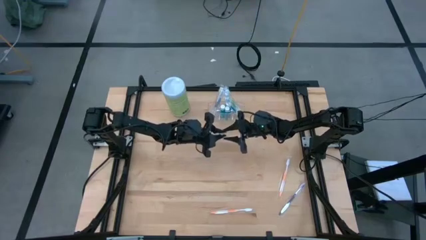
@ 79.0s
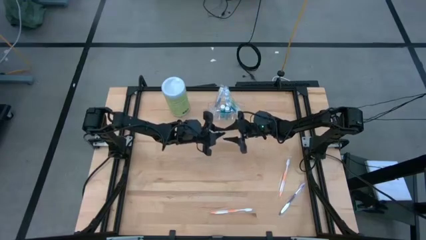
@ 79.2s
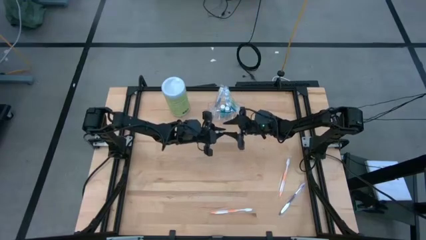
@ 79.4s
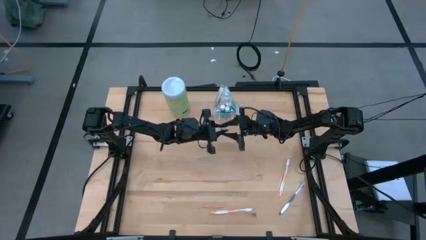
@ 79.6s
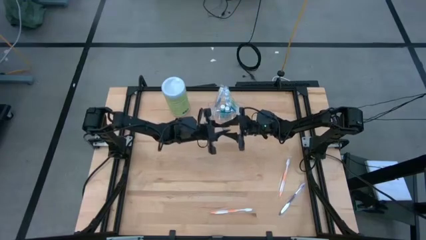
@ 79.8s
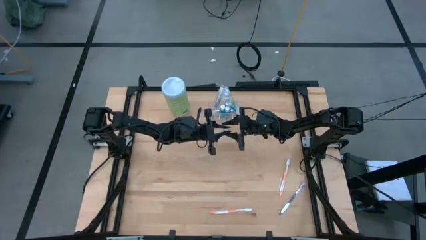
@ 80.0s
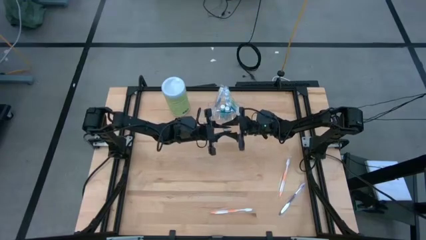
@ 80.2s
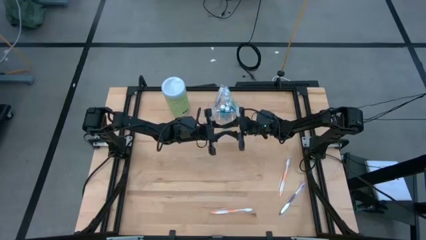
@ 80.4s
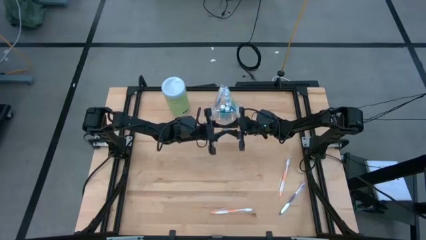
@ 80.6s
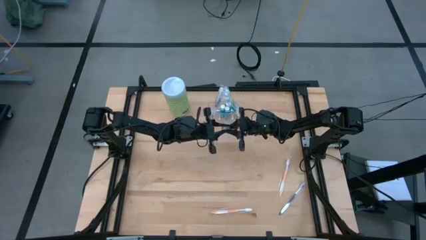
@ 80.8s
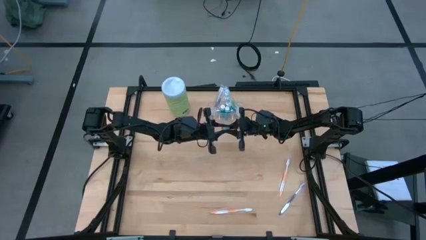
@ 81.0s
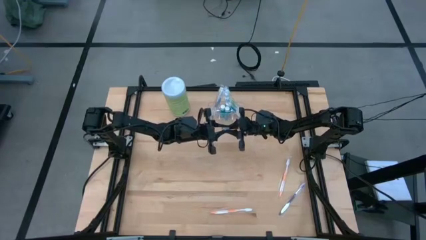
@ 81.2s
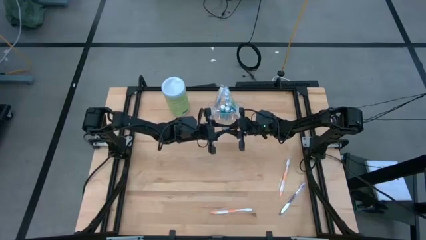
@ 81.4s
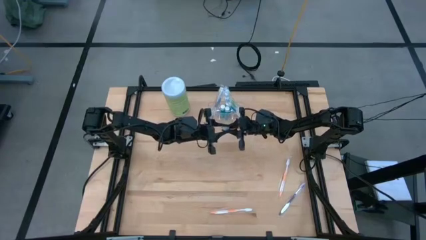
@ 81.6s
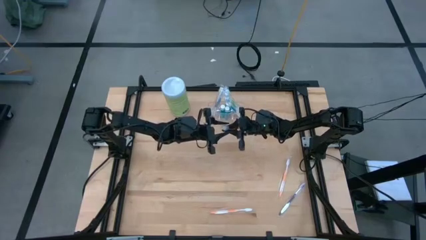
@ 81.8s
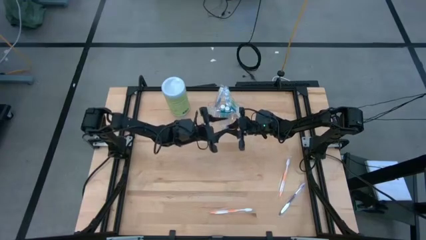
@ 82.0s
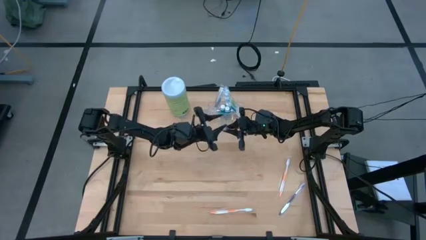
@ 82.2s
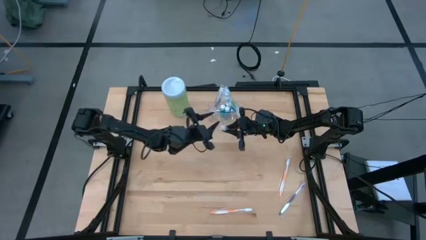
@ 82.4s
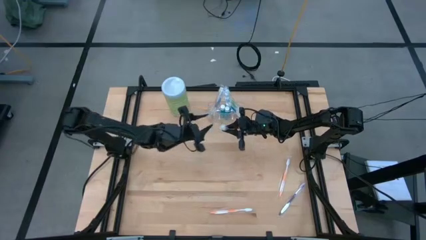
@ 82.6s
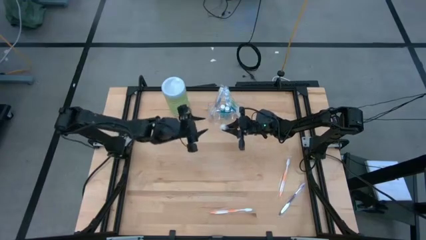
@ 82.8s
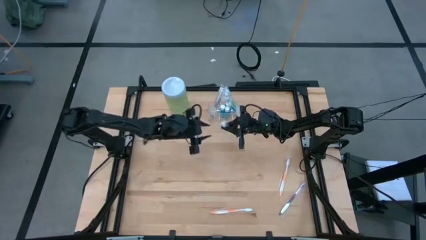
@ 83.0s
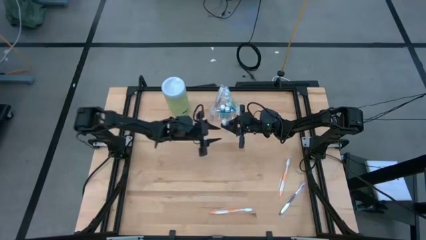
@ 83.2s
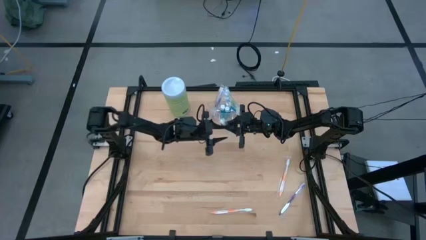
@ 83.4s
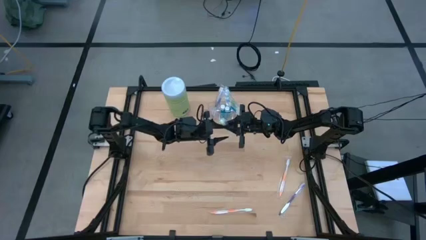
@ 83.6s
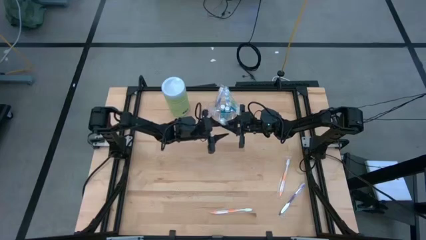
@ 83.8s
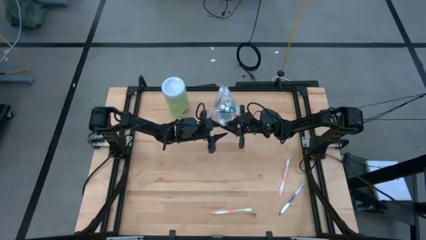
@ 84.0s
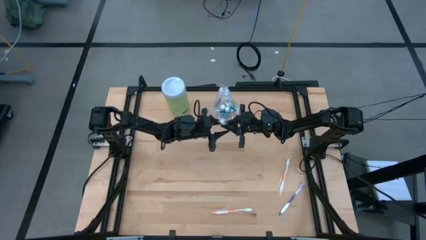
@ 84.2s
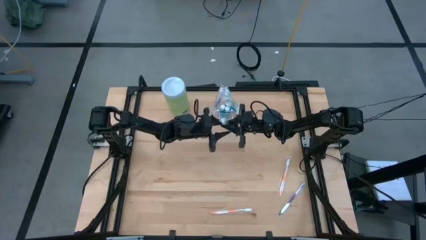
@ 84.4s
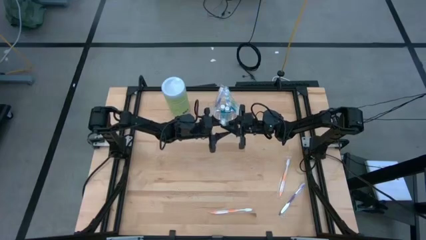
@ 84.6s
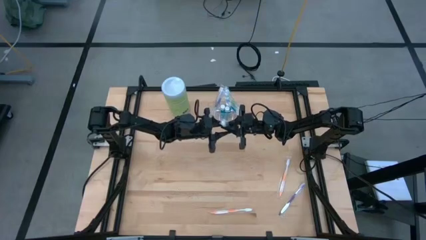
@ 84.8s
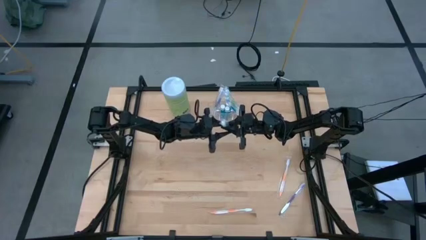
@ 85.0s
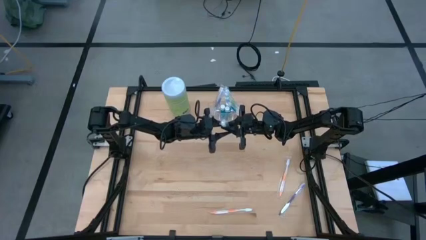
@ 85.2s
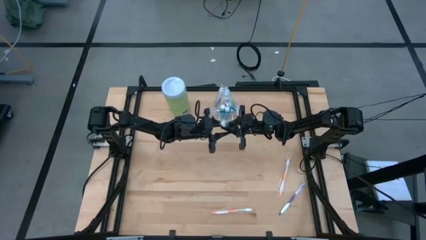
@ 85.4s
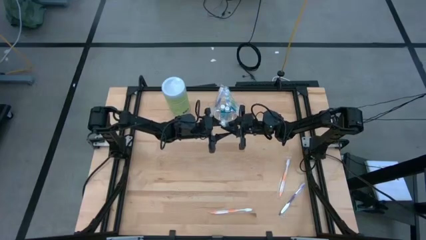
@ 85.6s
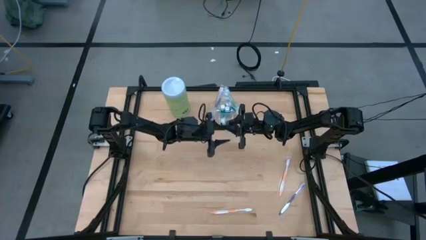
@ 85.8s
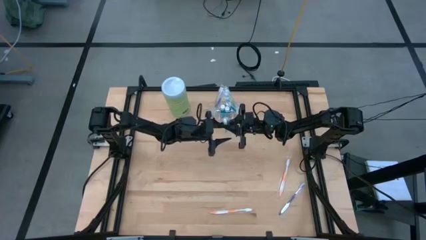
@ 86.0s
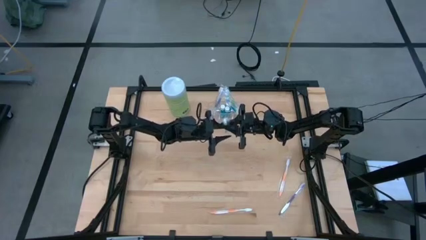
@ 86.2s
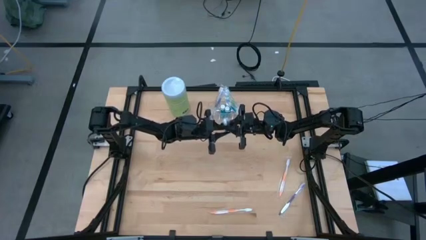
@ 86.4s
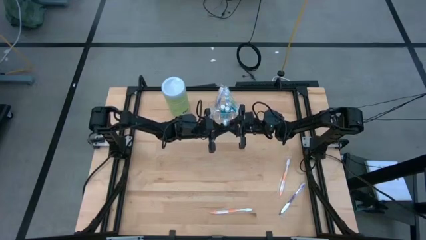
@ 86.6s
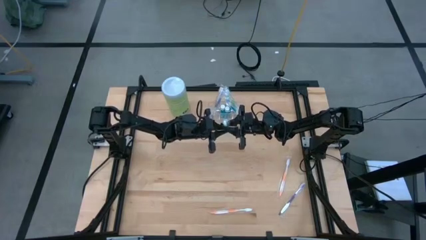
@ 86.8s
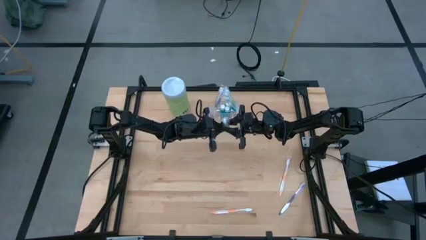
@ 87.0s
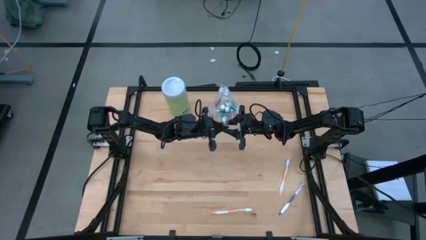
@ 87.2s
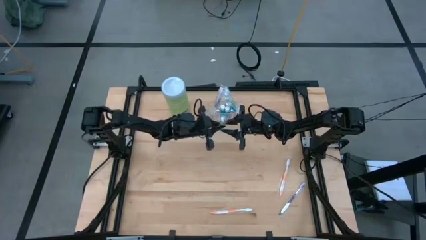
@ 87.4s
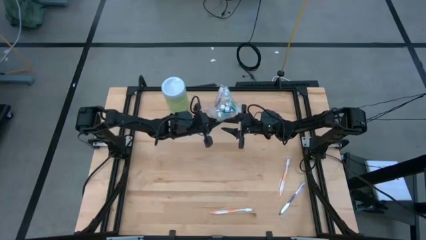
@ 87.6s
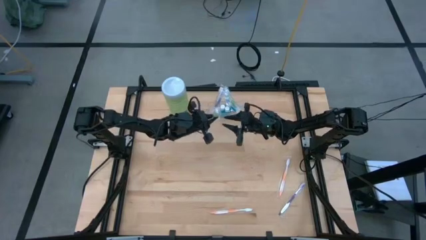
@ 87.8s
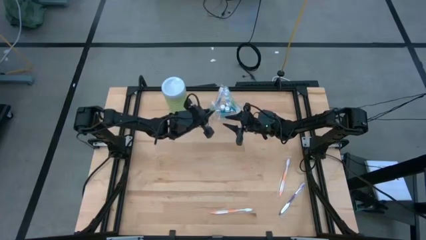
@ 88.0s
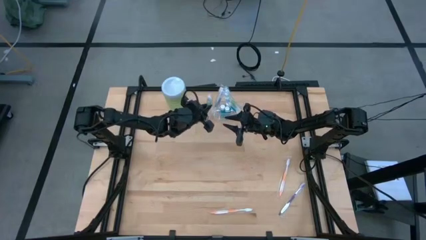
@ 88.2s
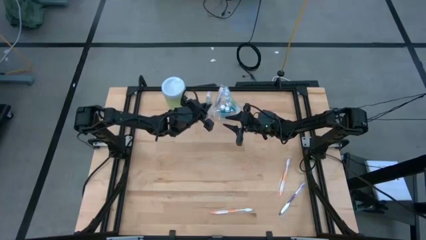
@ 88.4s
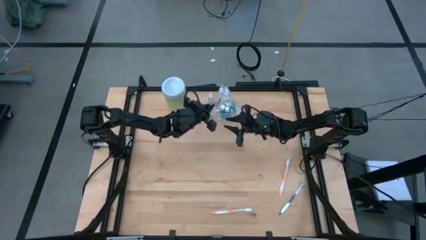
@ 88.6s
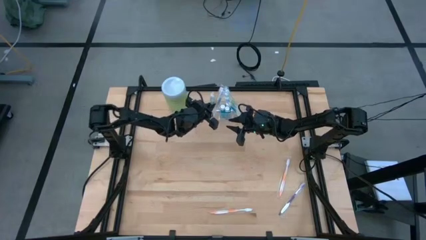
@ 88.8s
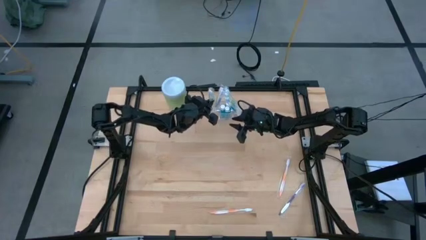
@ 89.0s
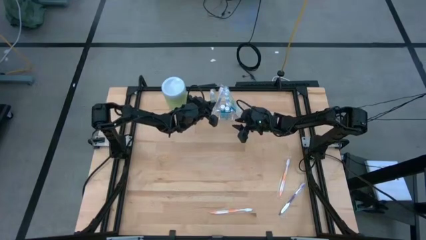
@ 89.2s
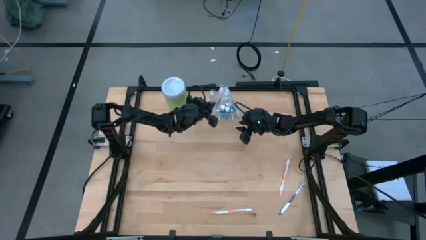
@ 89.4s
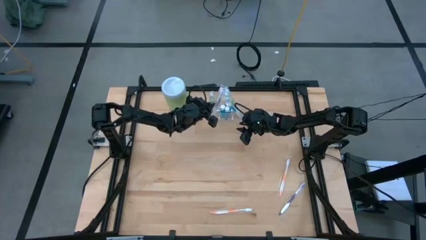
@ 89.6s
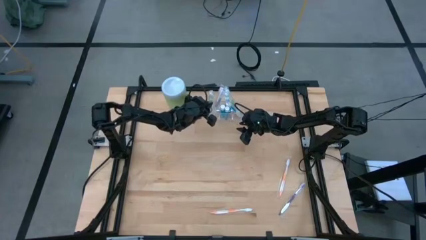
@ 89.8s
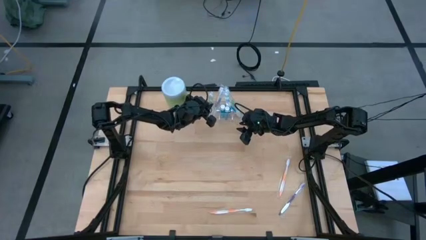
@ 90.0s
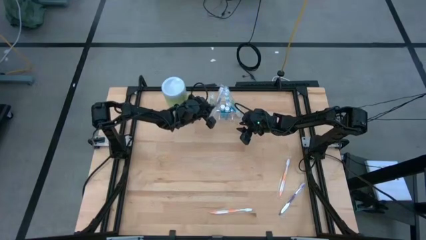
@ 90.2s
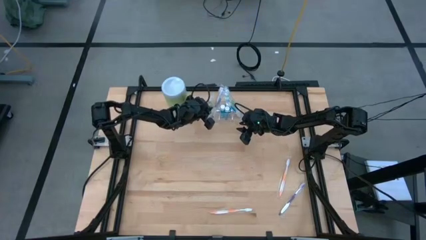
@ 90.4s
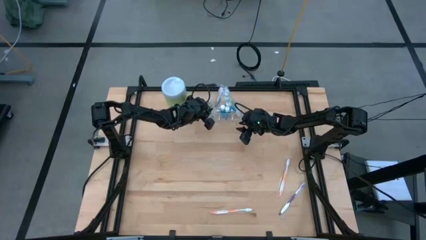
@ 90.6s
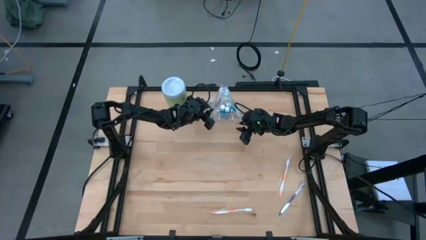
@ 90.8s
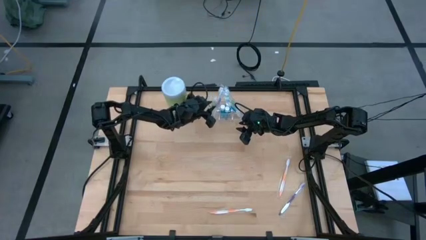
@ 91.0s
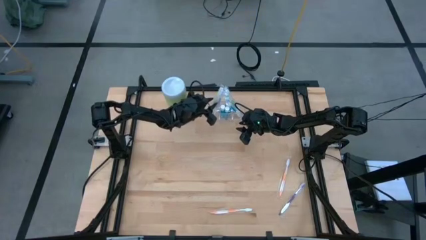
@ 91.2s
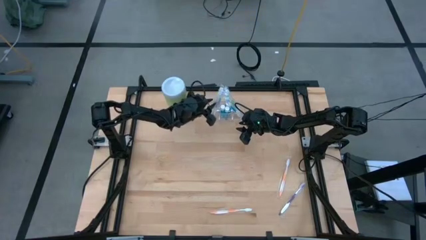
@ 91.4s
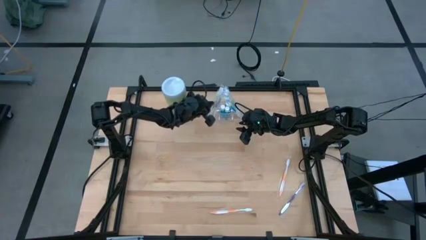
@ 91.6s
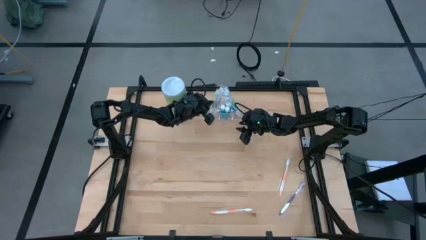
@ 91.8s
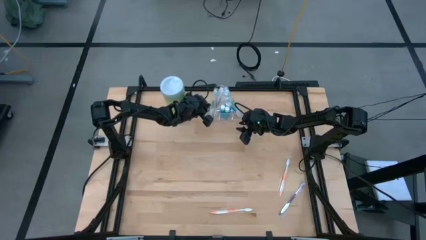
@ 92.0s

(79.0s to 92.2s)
Task: Pick & Place toothbrushing station
Put the green toothbrush into the transparent organizer

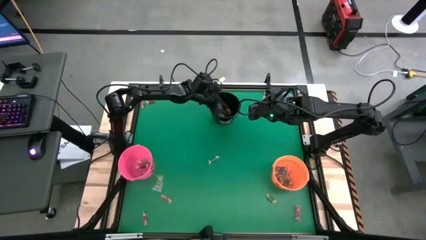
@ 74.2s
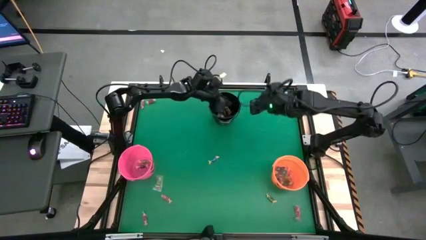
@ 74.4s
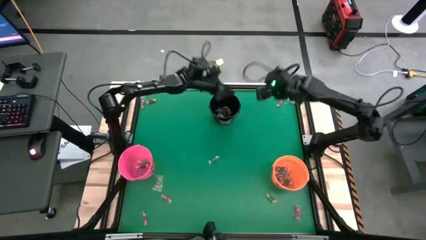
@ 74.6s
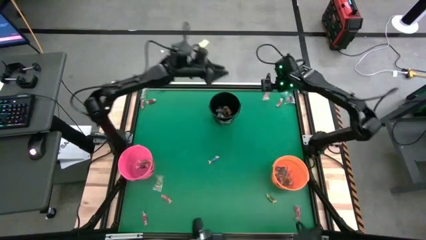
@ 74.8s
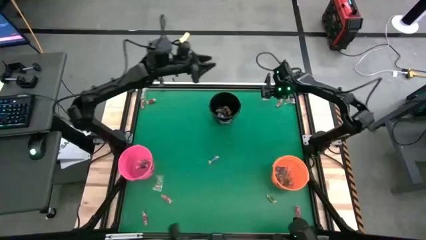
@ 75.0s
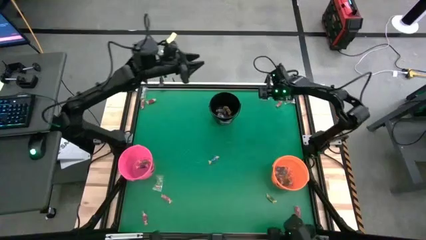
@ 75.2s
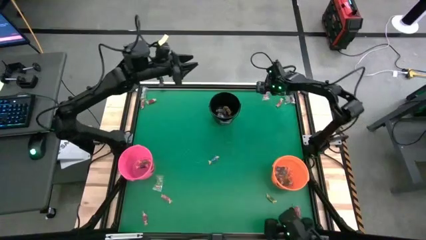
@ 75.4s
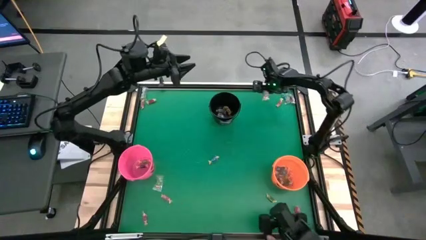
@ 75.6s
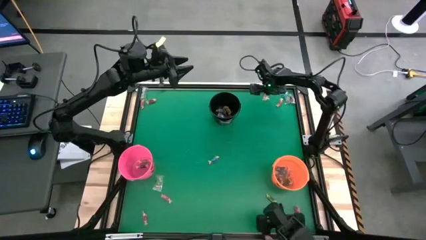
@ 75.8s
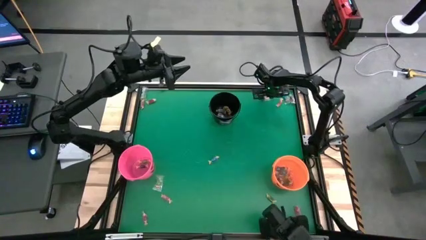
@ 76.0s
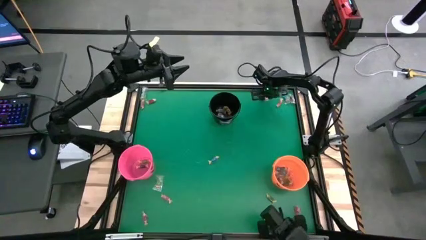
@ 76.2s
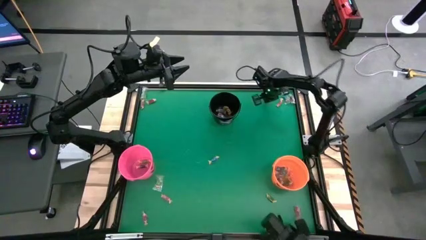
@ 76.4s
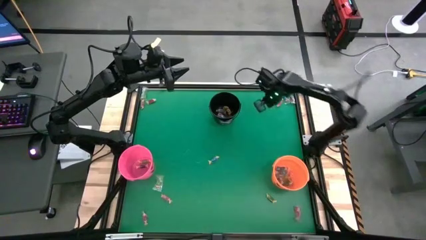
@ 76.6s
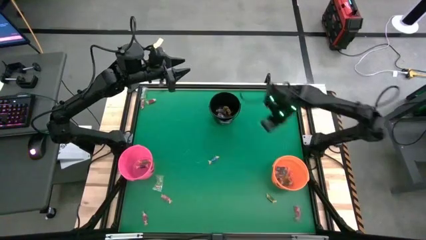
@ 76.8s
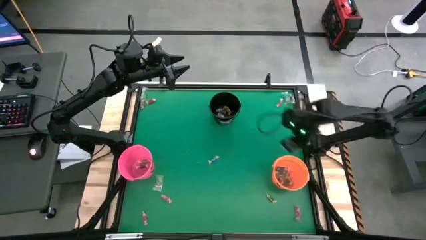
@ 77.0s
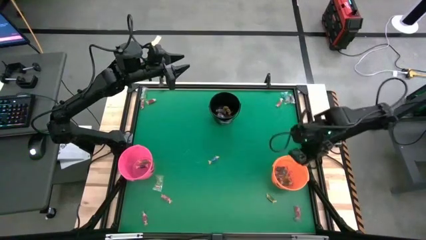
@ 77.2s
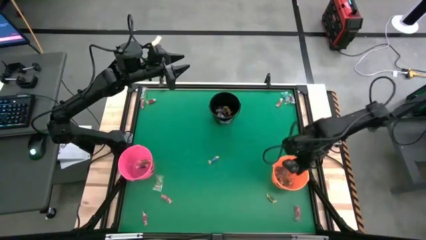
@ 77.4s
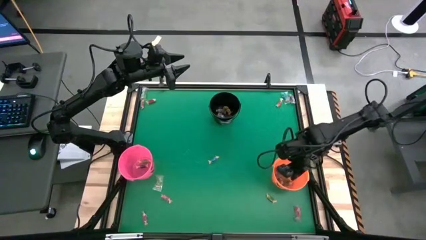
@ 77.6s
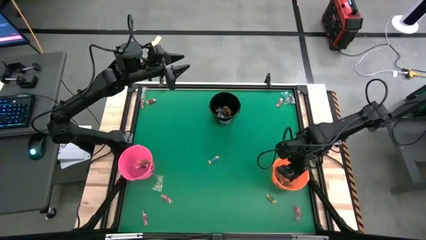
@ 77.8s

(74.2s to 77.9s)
Task: Sort candy by brand, put in halloween buckets
Put the orange gummy into the orange bucket
